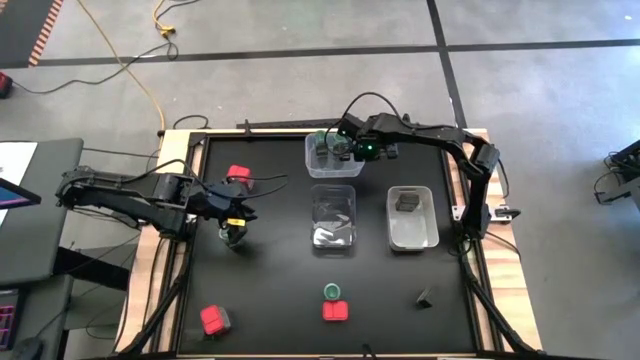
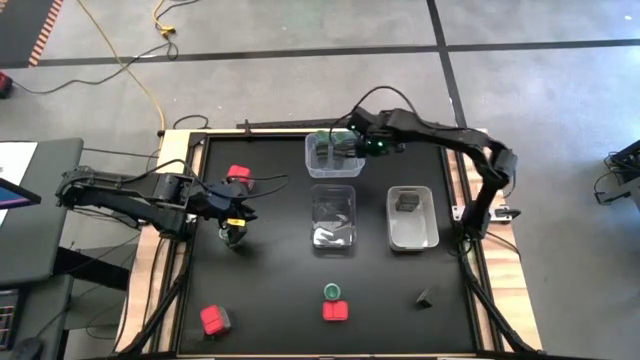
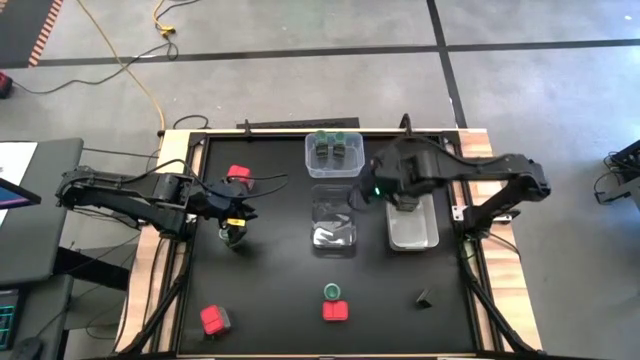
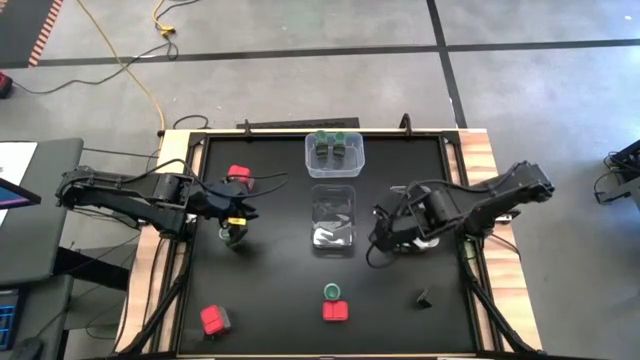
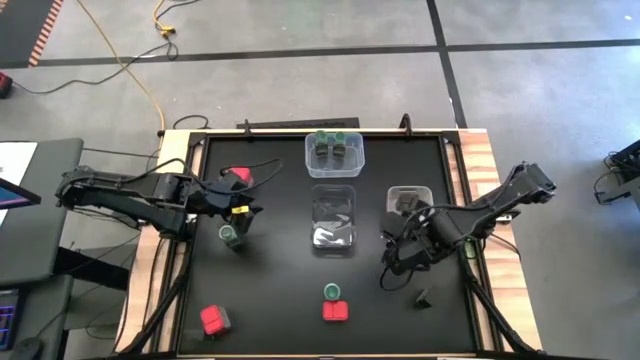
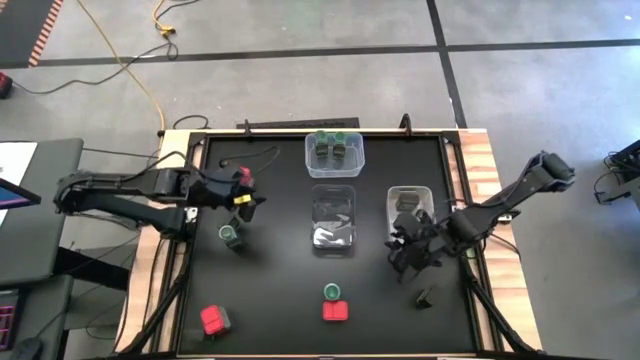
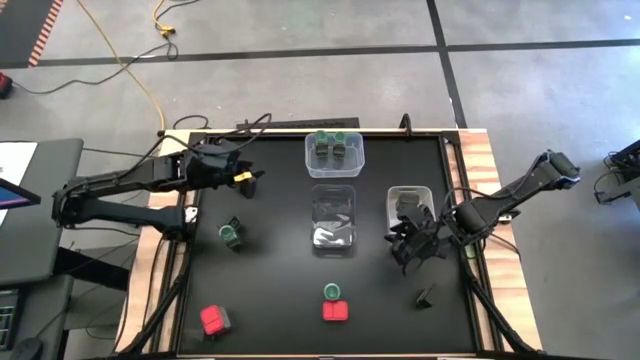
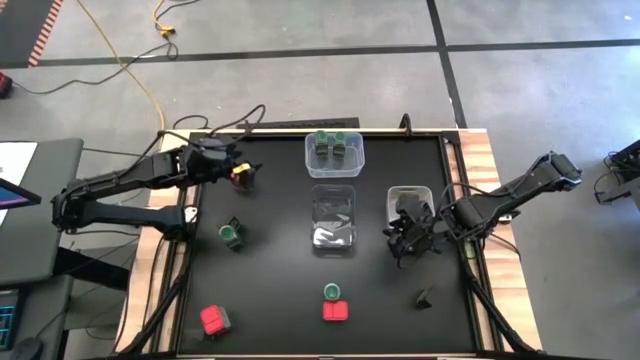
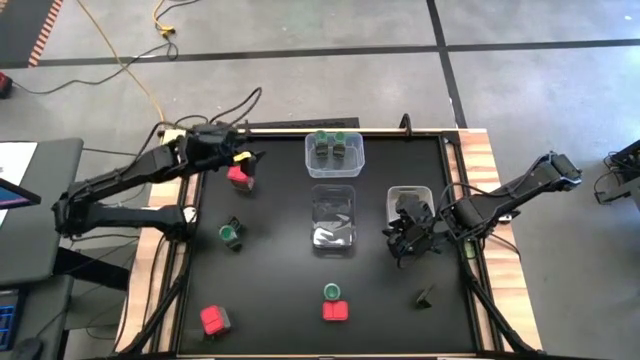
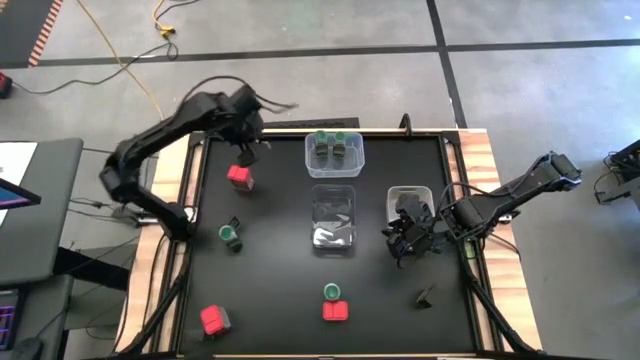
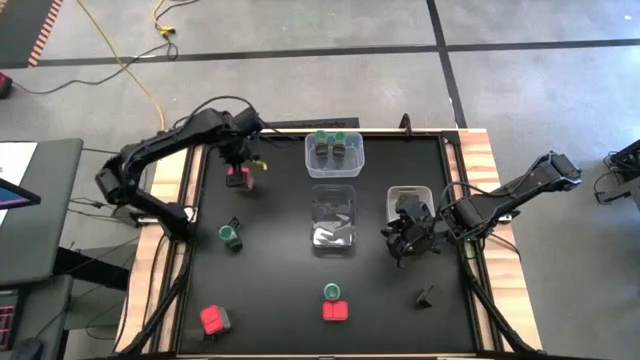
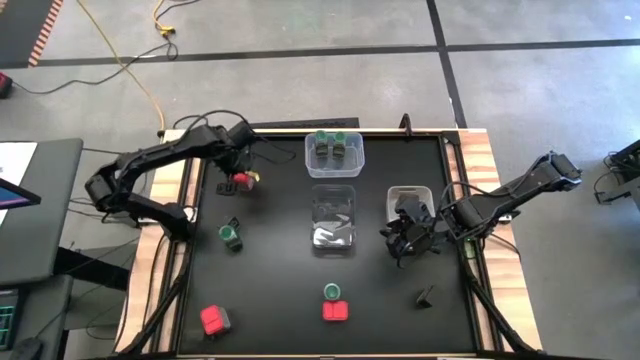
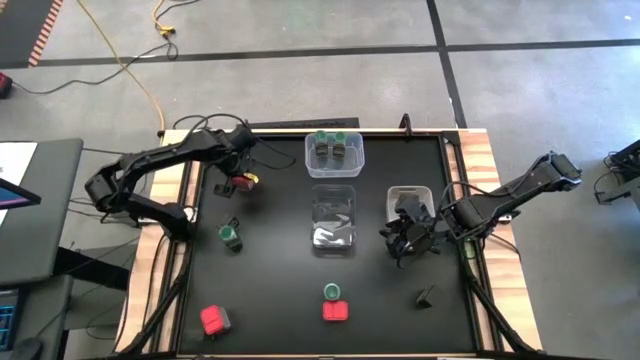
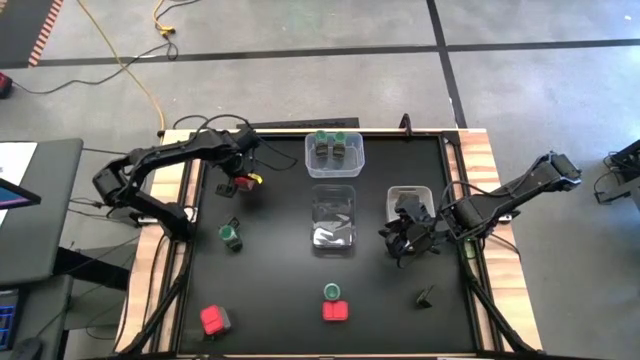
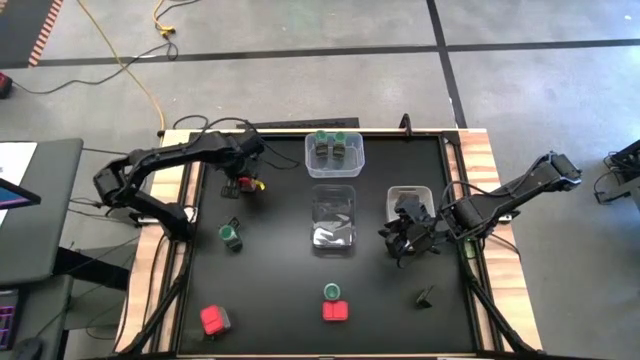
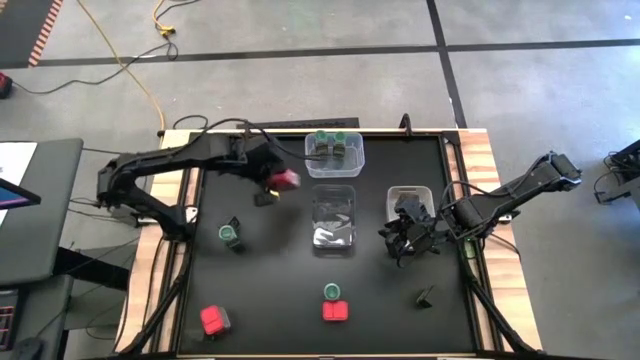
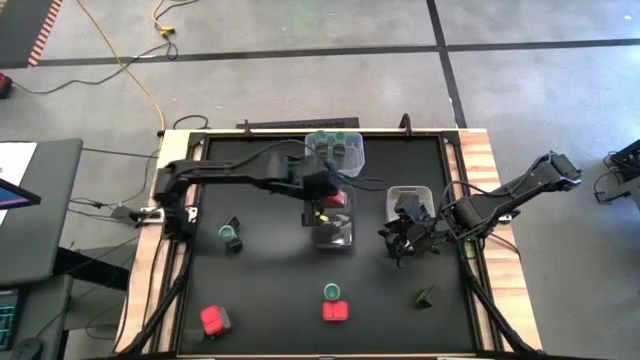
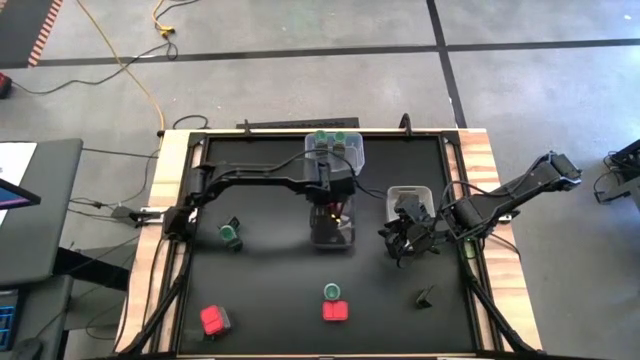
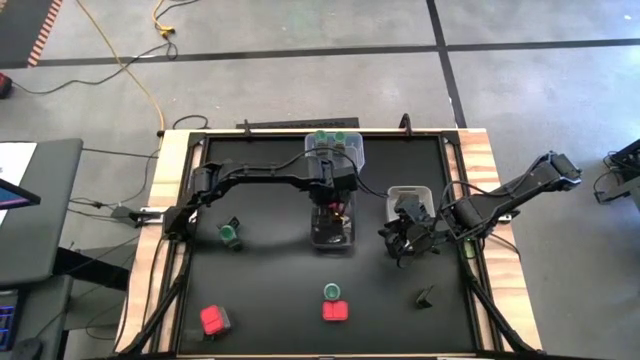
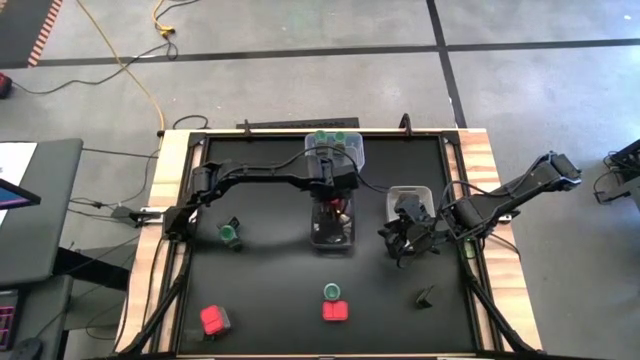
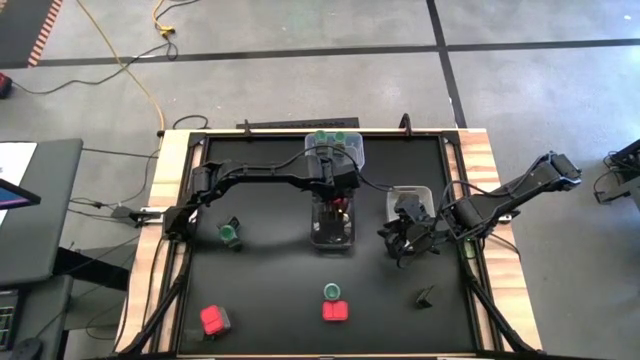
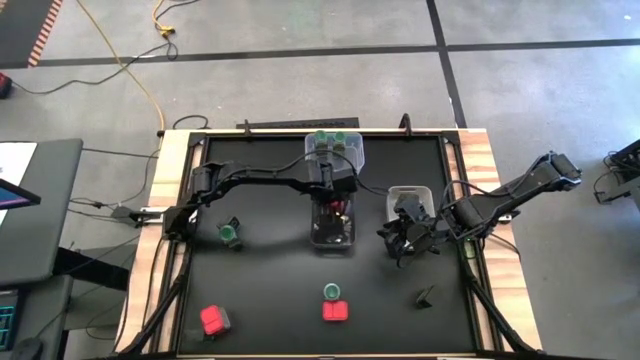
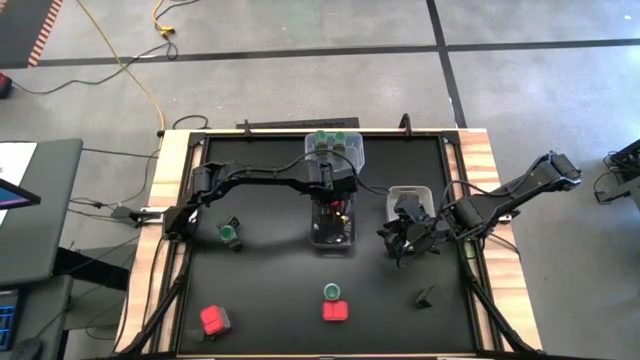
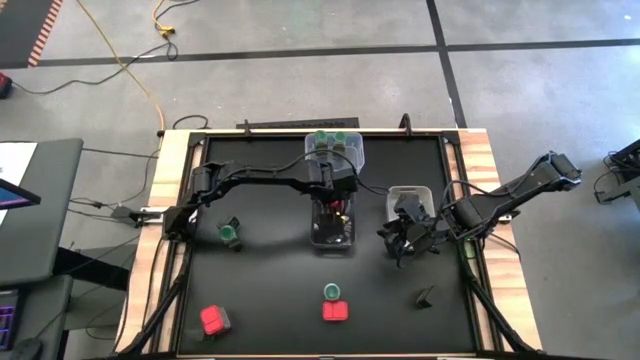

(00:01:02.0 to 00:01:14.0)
Task: Sort spices by type
Put the red seasoning can into the black transparent bin

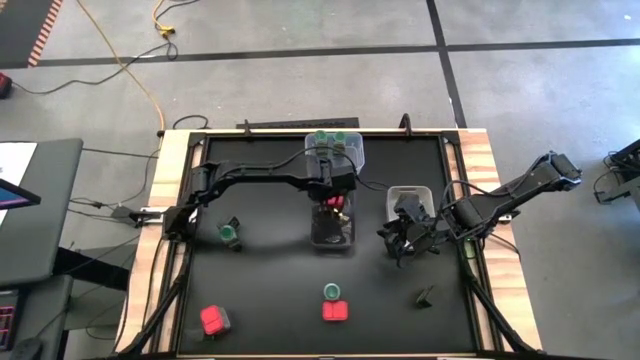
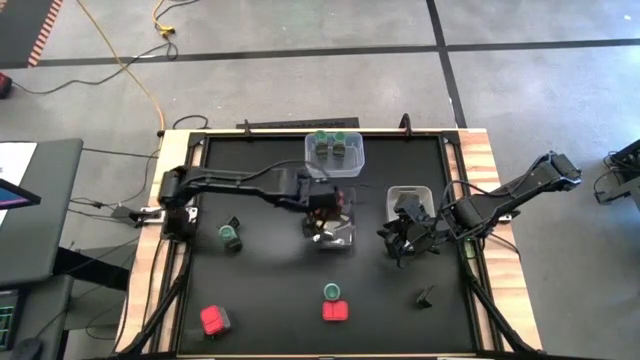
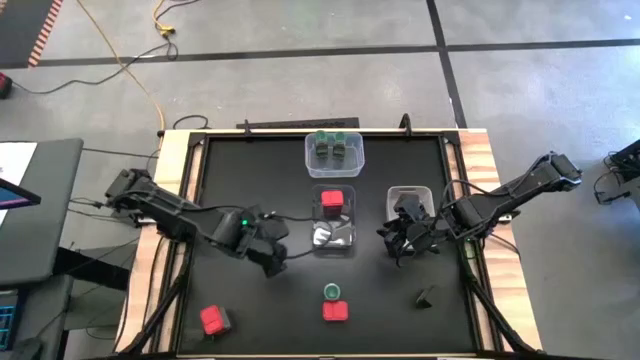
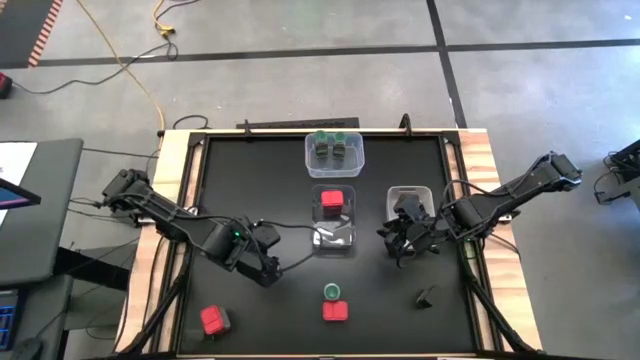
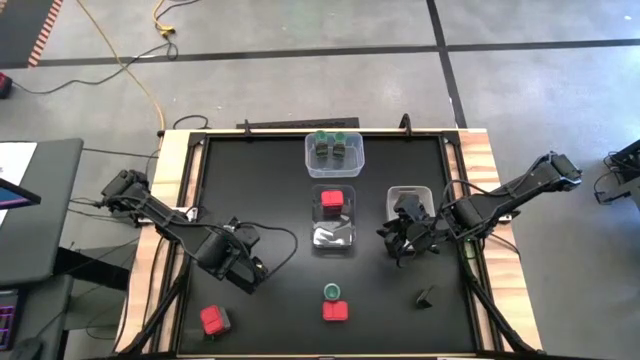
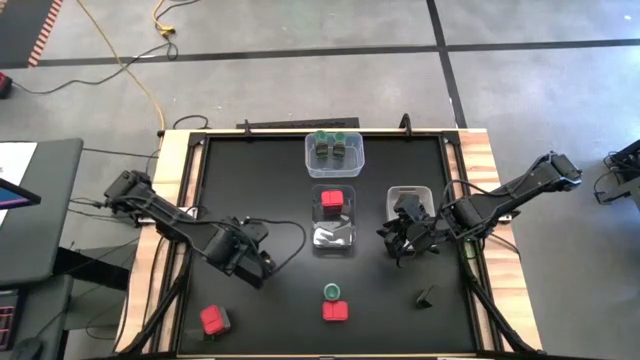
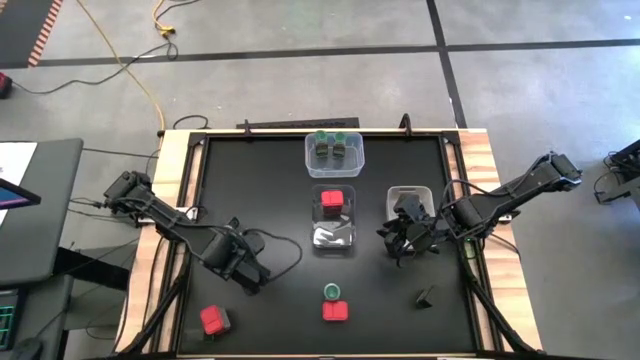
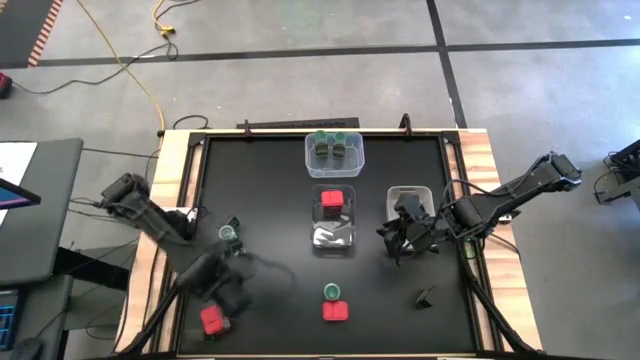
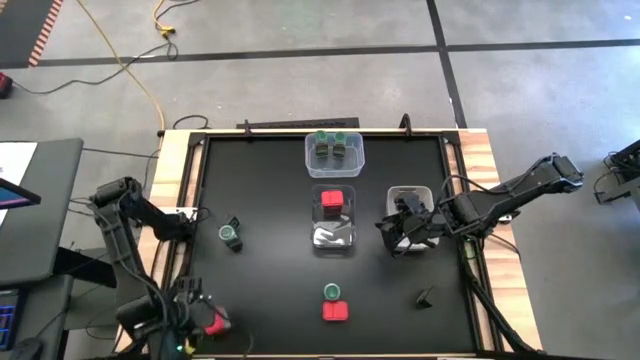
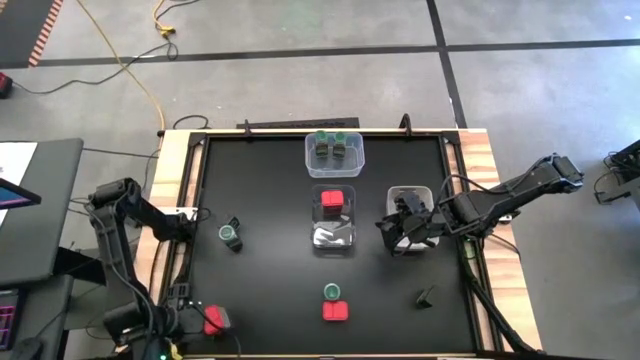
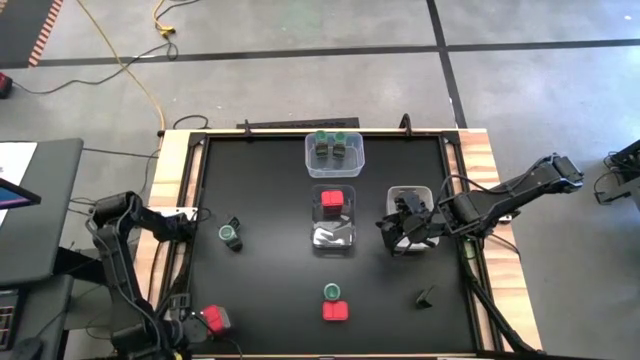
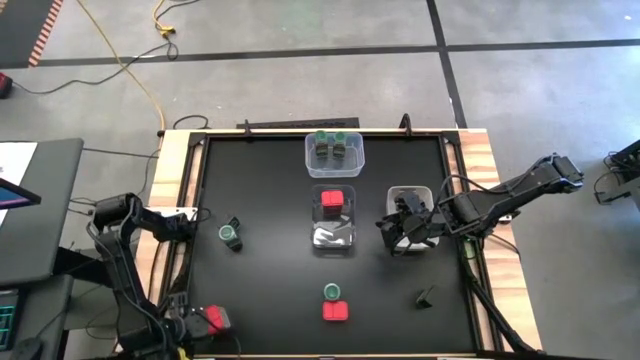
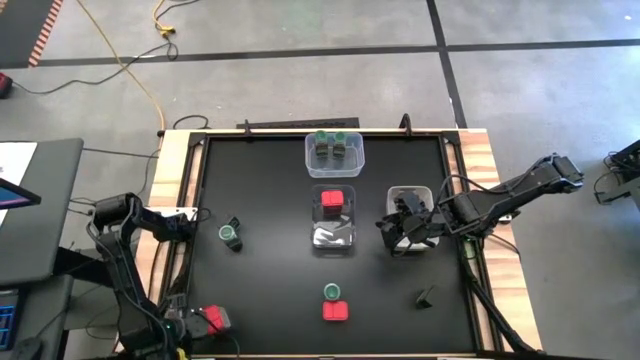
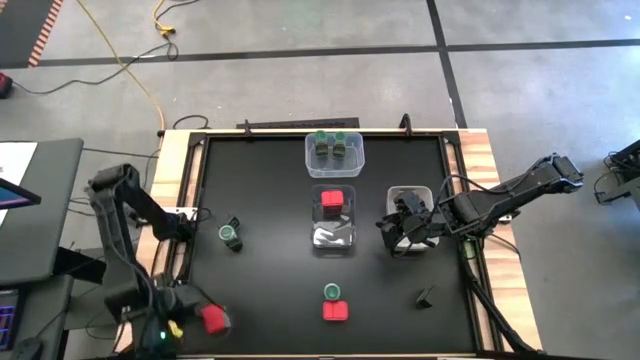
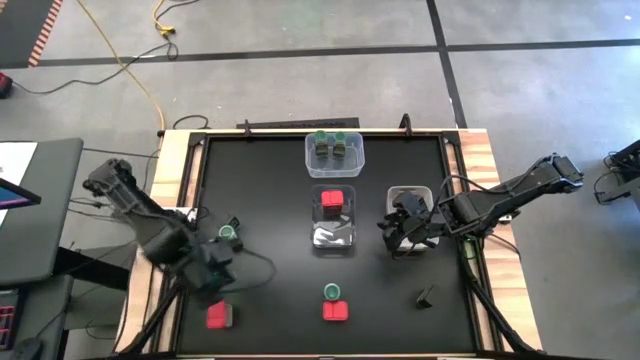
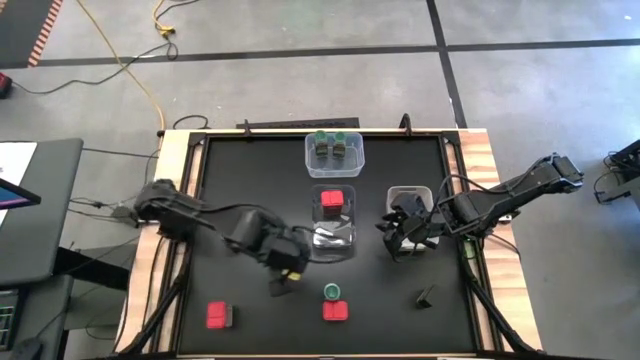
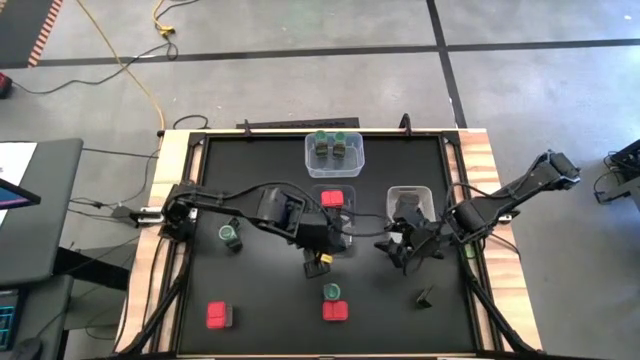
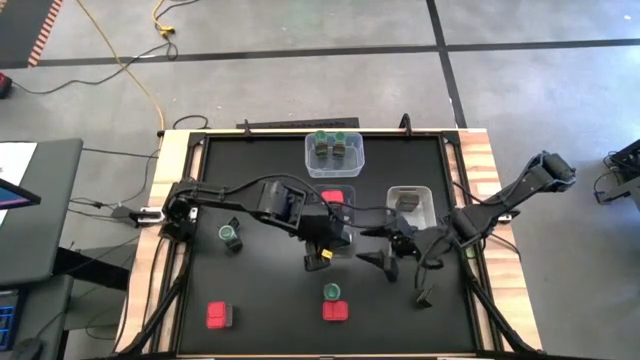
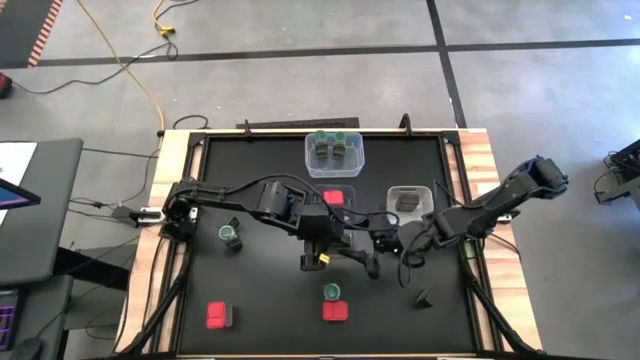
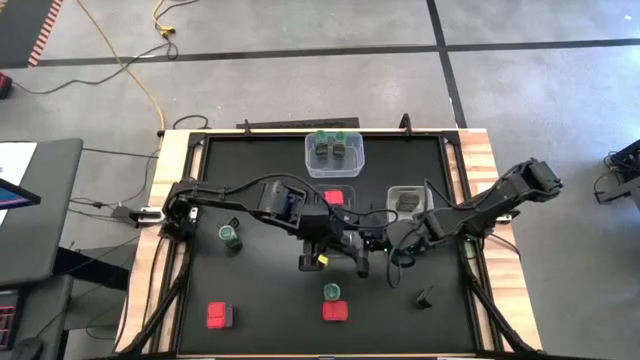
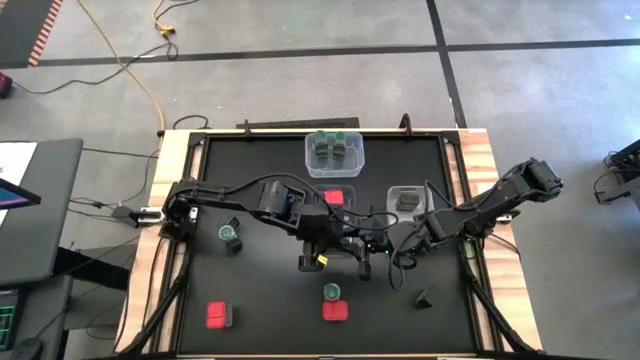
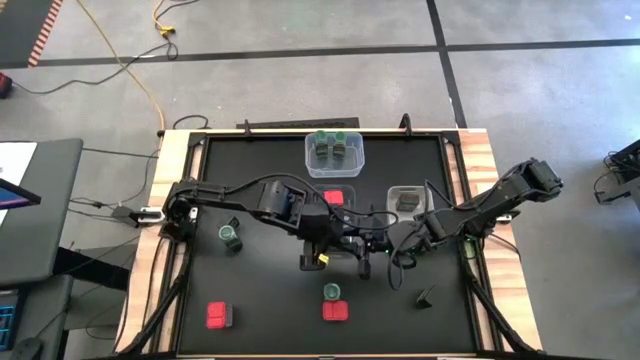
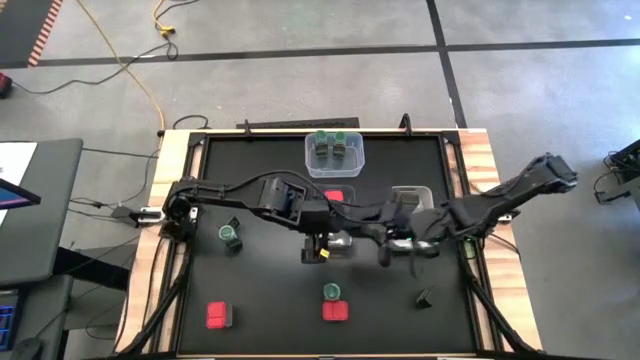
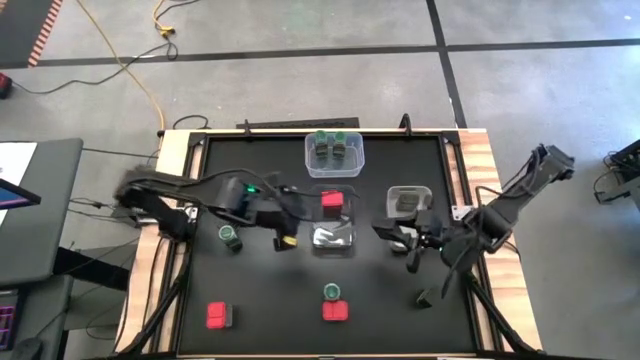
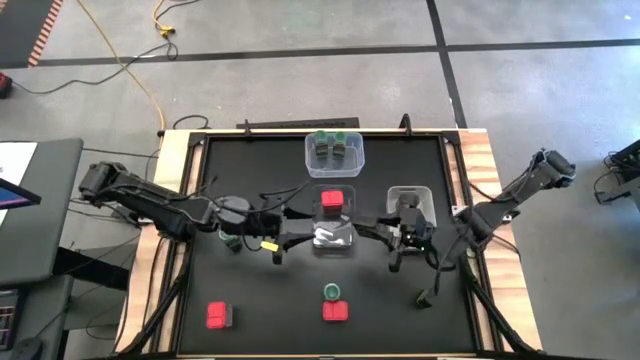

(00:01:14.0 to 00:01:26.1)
Put the black seasoning can into the gray bin
